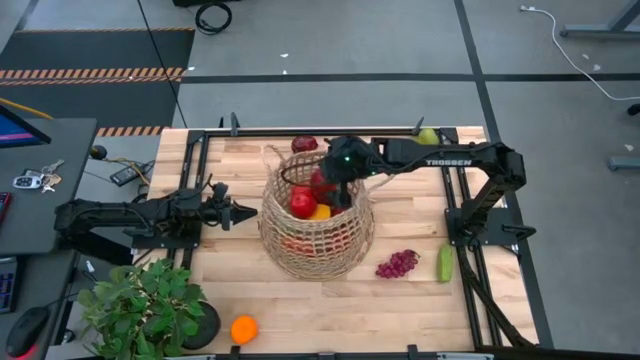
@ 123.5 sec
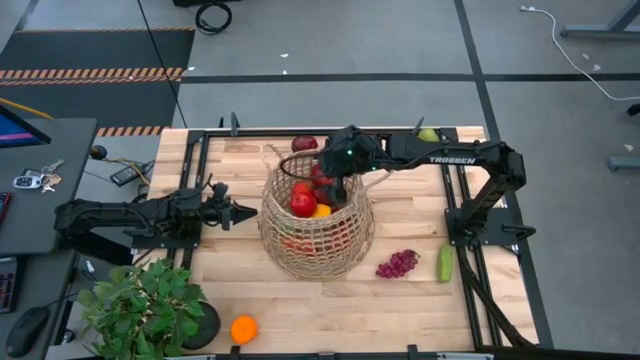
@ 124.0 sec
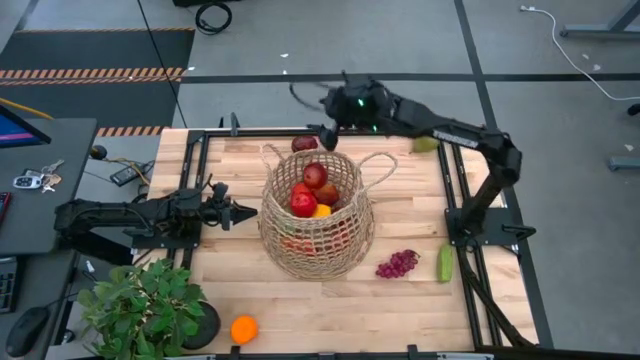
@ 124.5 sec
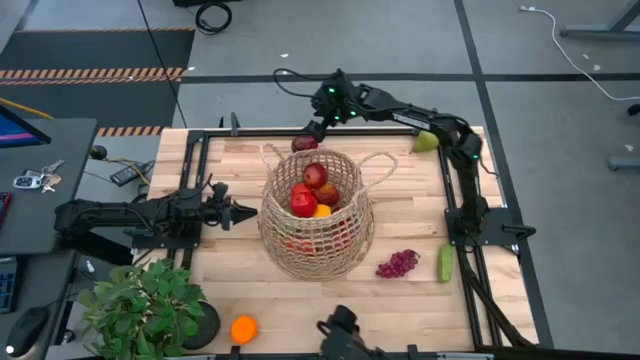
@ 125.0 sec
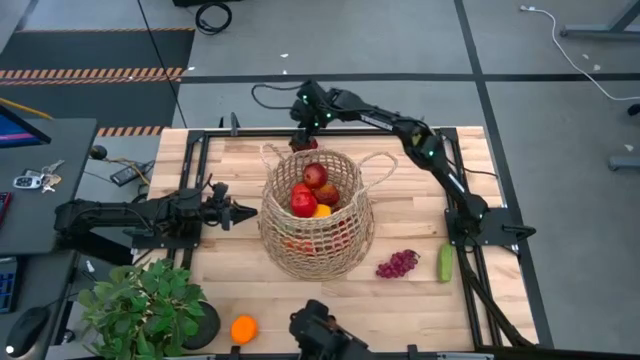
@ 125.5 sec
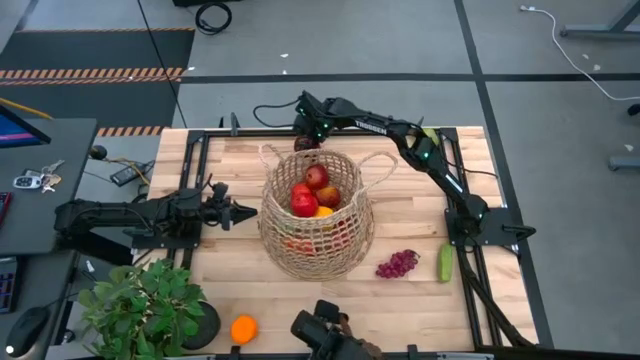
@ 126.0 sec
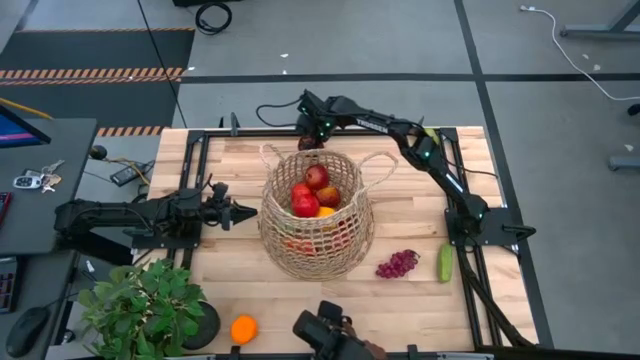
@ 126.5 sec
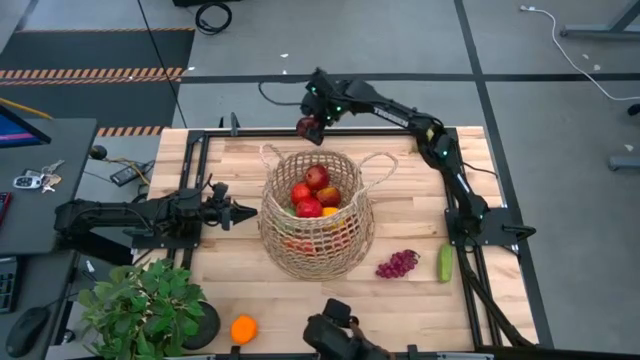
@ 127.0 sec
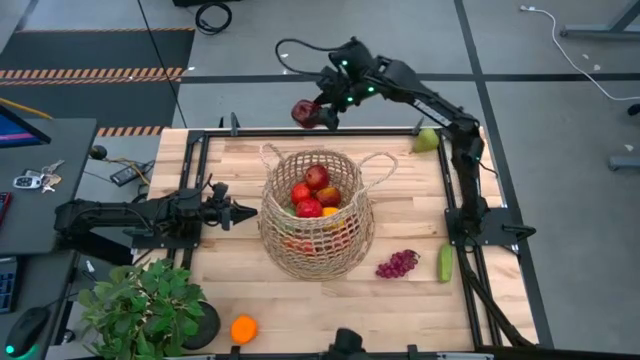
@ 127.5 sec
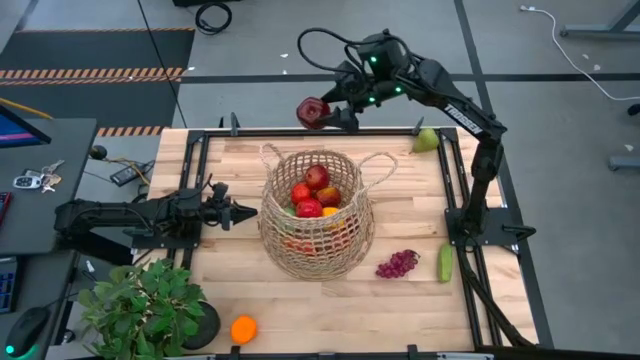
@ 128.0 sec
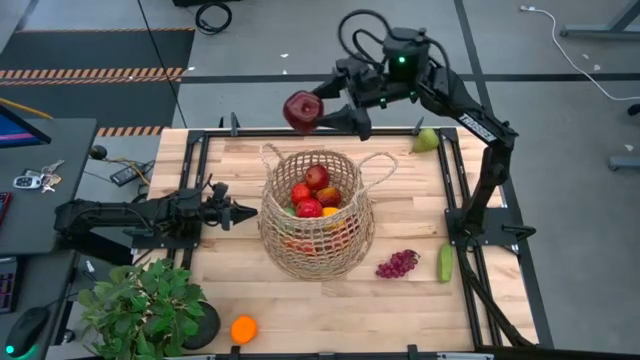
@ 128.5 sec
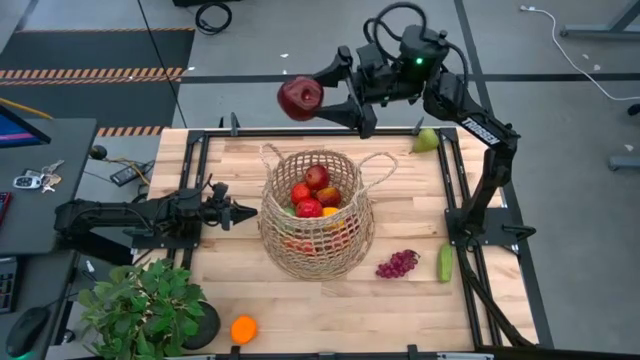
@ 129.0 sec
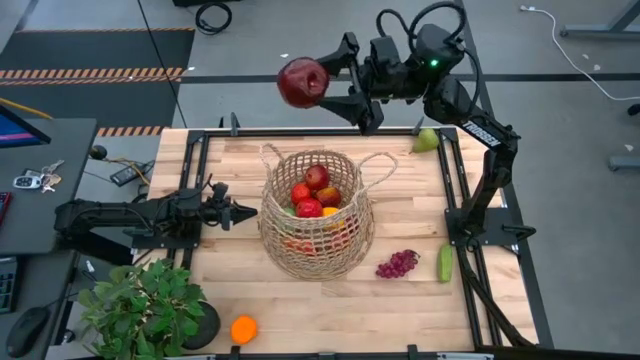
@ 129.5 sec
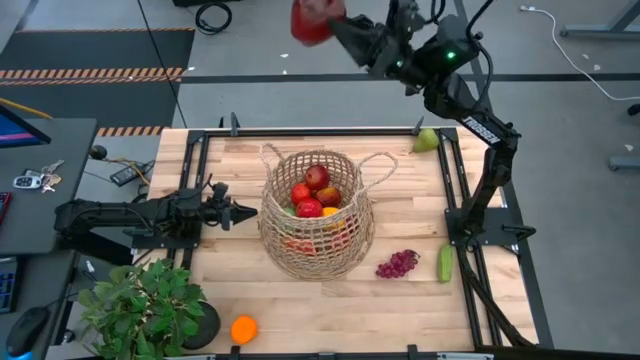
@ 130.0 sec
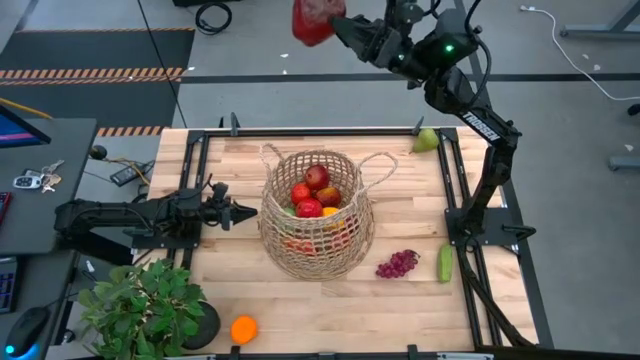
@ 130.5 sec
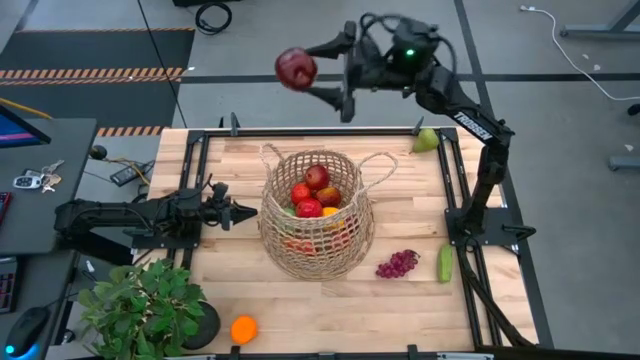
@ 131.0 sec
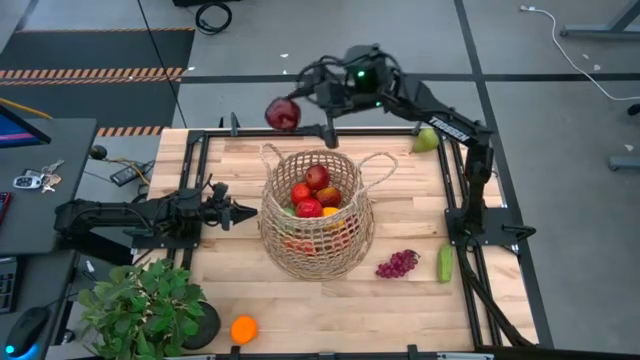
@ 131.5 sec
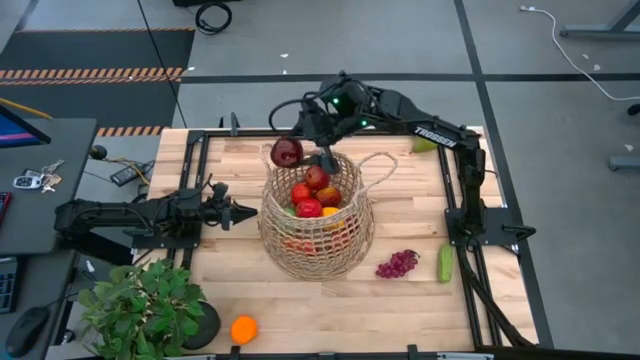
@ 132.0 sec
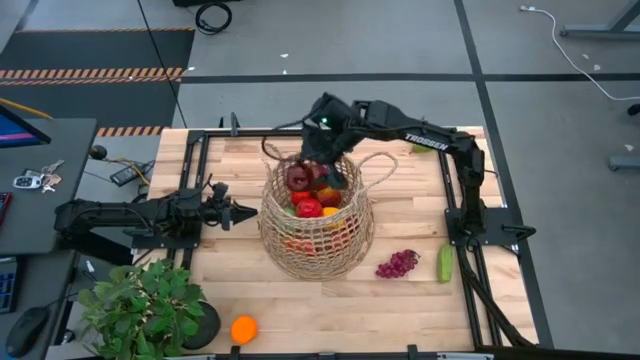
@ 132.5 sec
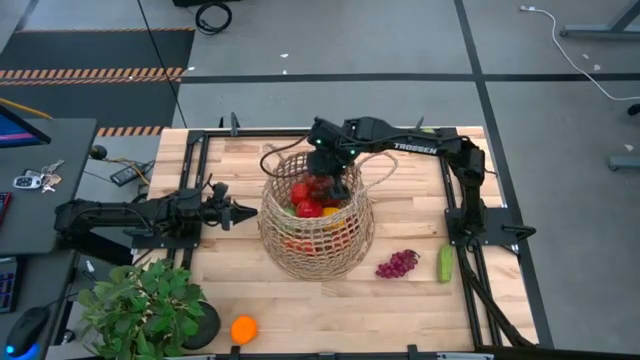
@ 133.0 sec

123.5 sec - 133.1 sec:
Task: Build produce basket
Put the red apple into the basket

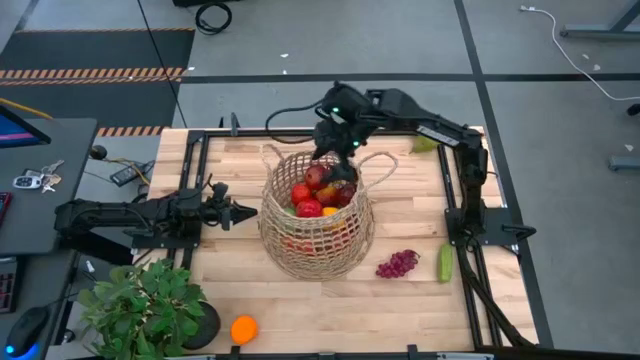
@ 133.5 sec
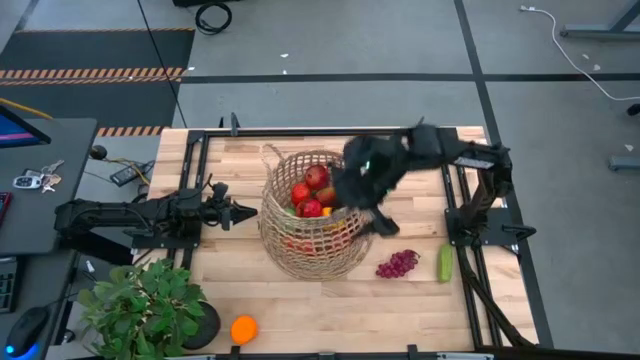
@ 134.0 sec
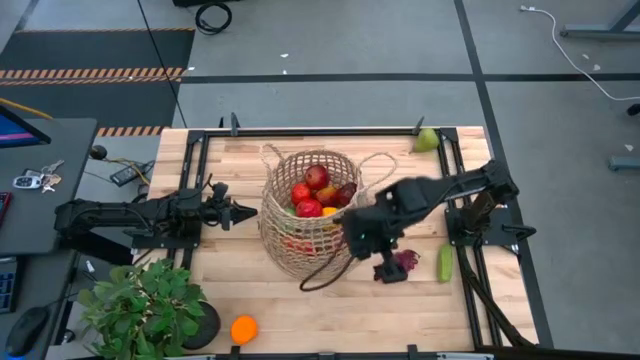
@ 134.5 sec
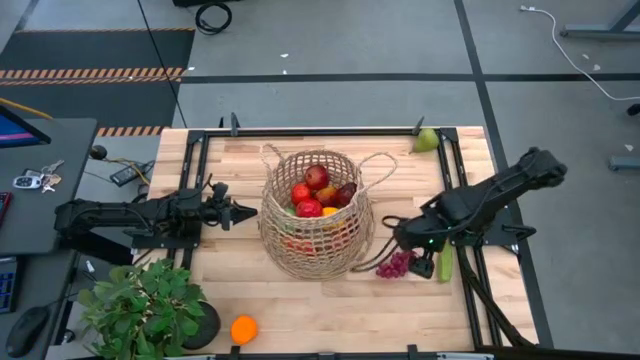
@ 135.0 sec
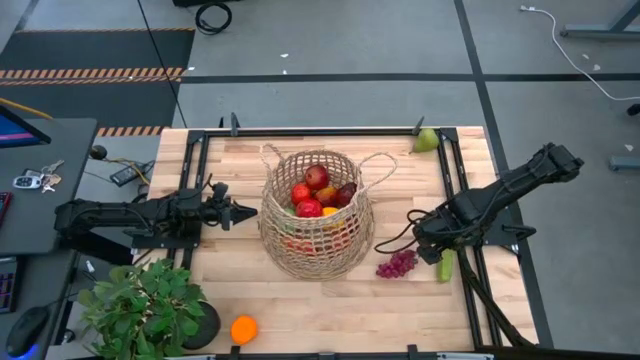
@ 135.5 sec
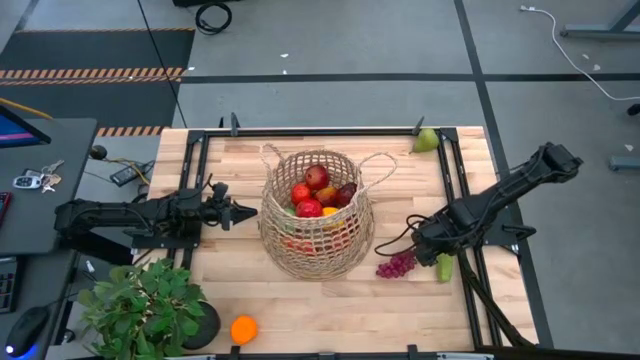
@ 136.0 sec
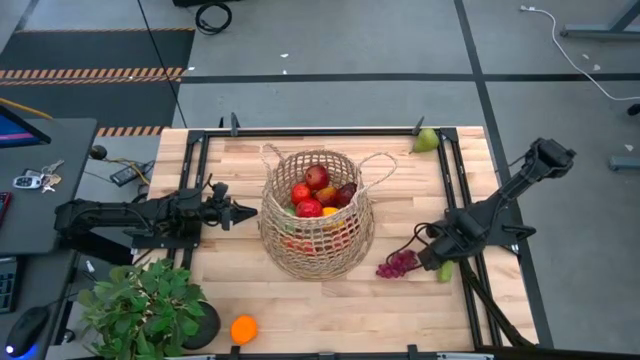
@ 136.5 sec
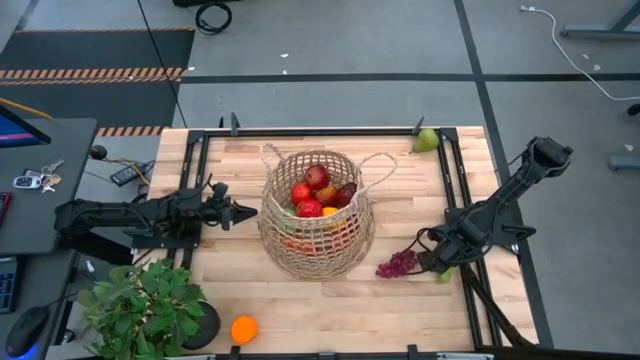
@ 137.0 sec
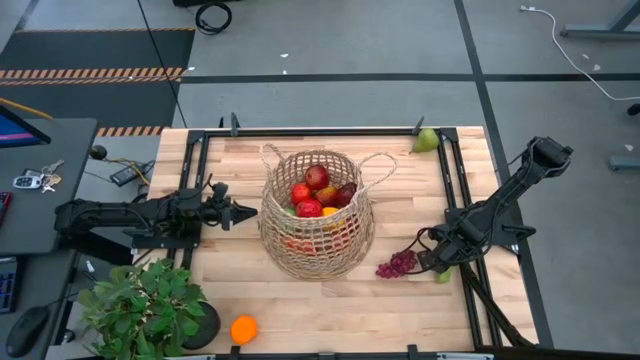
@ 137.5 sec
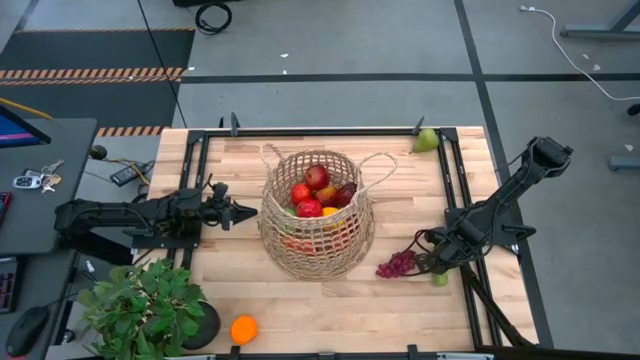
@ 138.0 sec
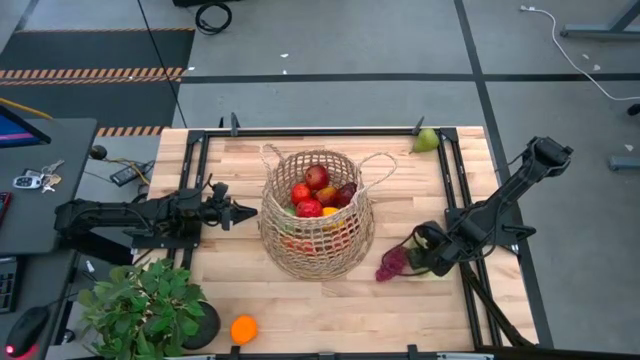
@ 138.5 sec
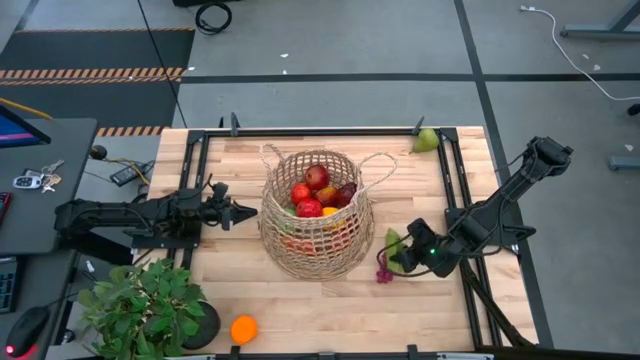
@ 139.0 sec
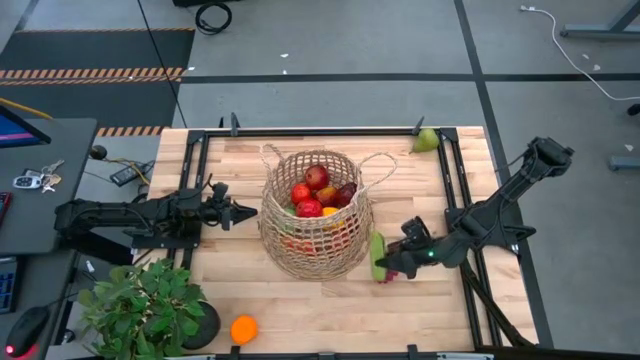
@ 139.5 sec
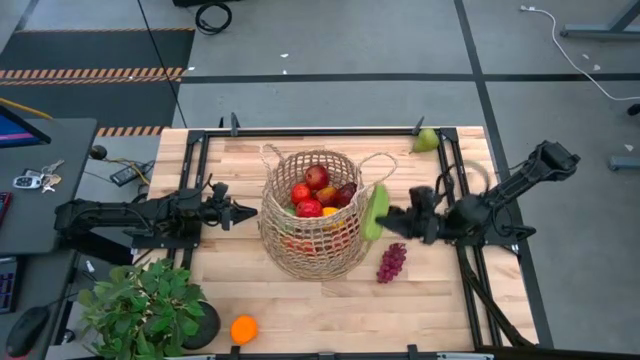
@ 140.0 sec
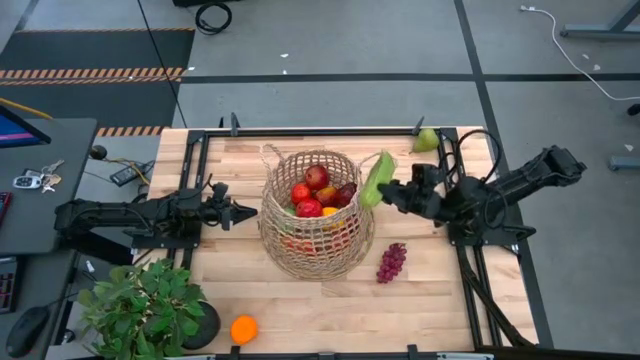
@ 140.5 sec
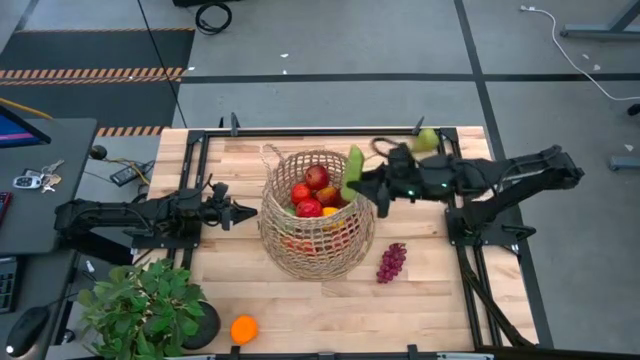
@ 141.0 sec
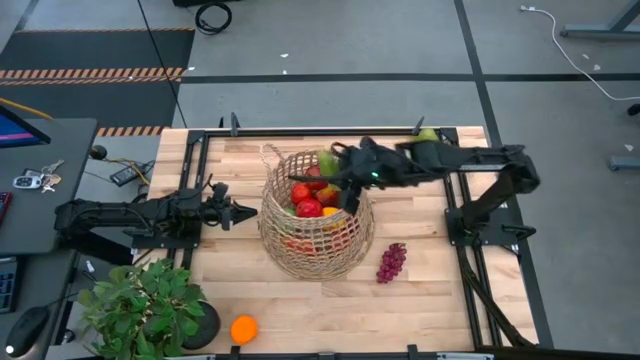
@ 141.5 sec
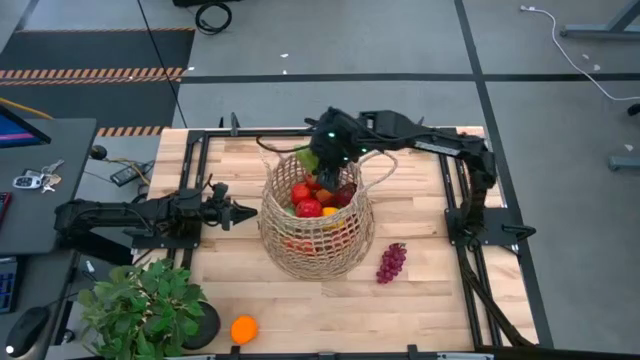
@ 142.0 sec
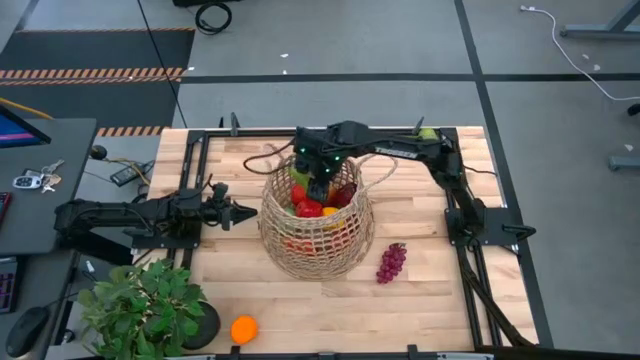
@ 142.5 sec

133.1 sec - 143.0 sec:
Put the green cucumber into the basket

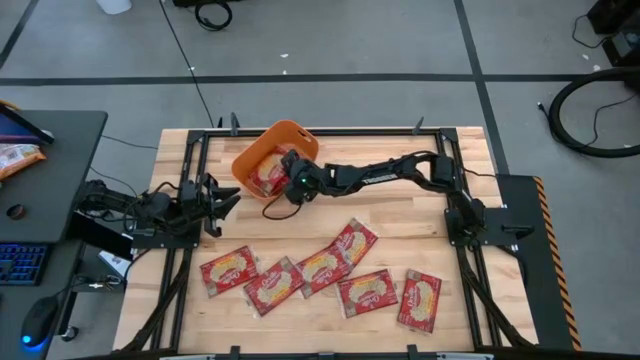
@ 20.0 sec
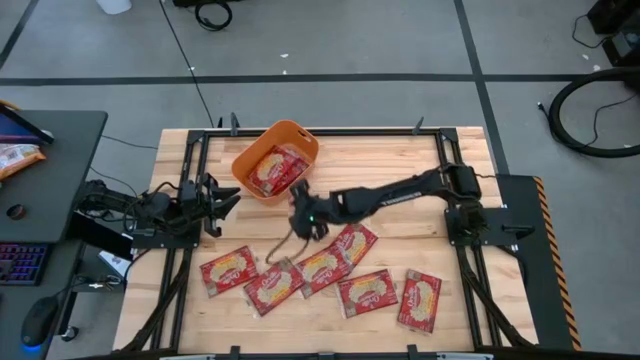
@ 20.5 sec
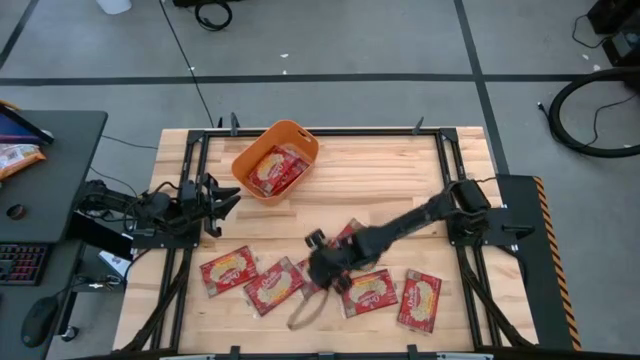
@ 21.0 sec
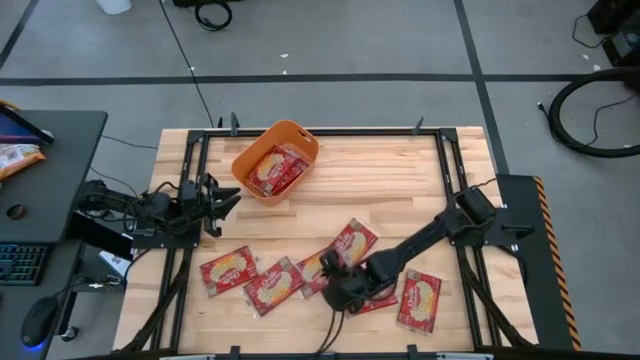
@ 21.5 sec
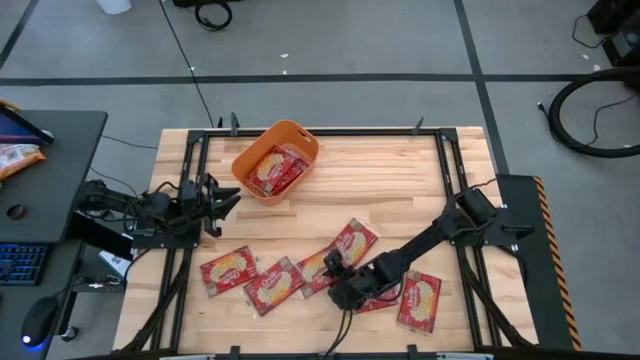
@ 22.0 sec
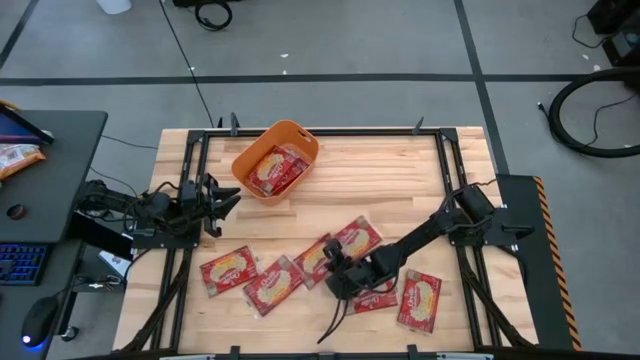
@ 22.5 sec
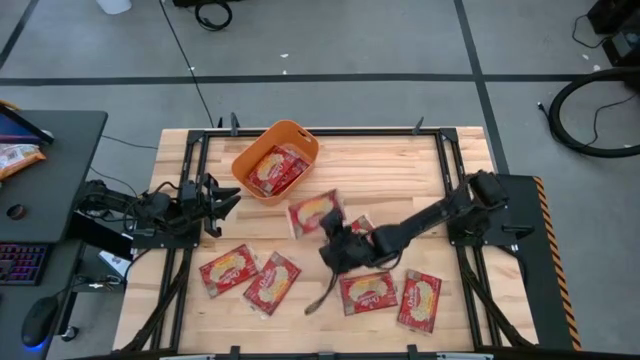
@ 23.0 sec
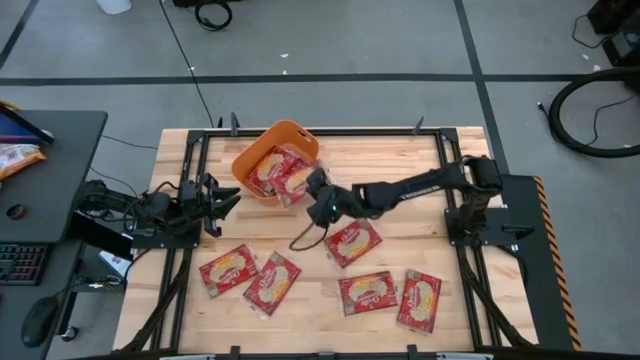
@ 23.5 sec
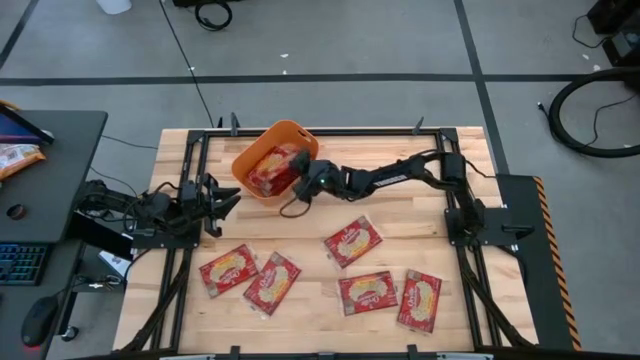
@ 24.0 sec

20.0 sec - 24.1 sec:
Task: Sort popcorn bags into baskets
Put the red popcorn bag into the orange bin
